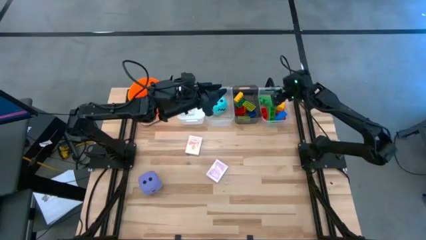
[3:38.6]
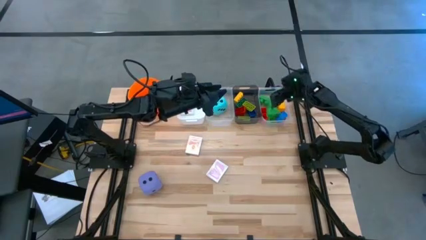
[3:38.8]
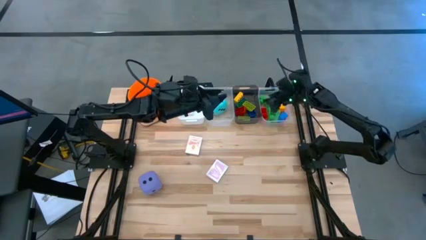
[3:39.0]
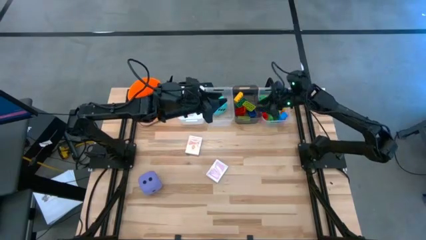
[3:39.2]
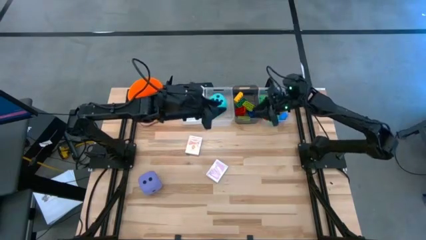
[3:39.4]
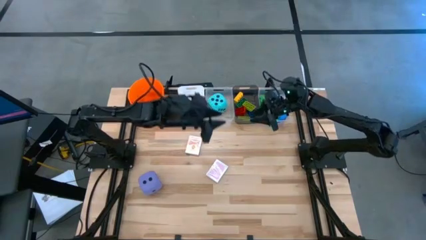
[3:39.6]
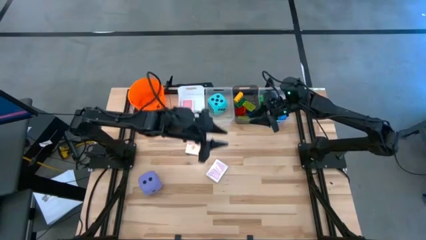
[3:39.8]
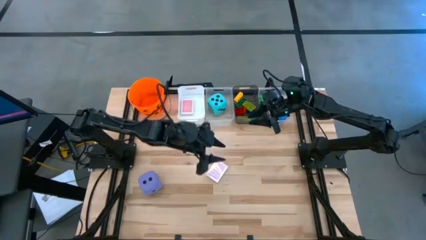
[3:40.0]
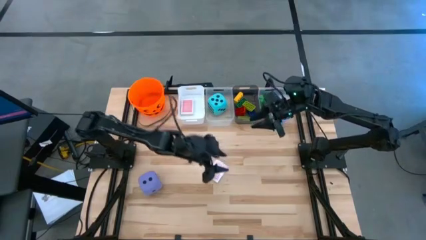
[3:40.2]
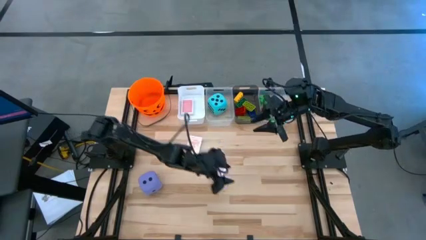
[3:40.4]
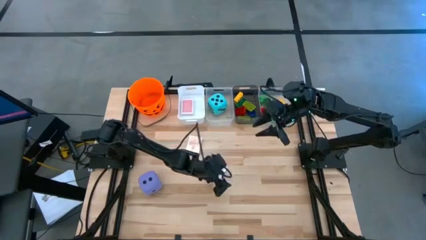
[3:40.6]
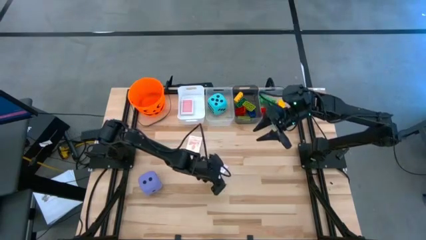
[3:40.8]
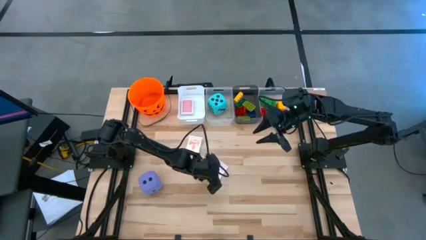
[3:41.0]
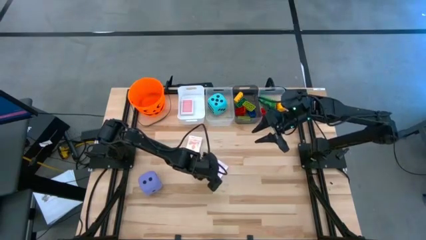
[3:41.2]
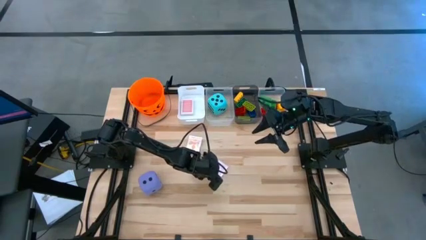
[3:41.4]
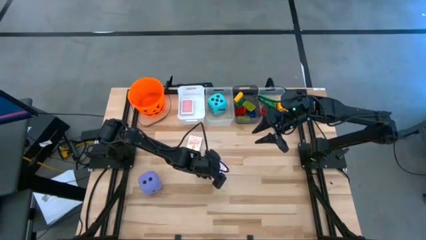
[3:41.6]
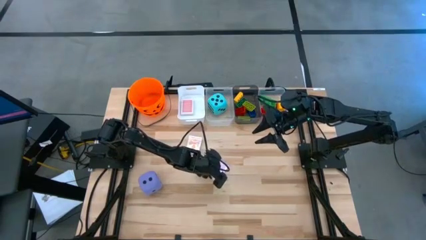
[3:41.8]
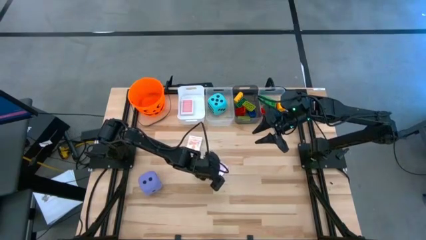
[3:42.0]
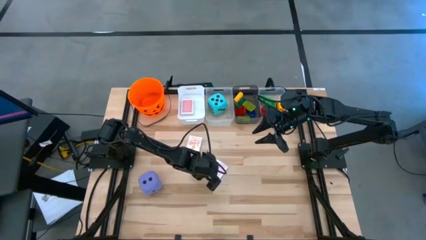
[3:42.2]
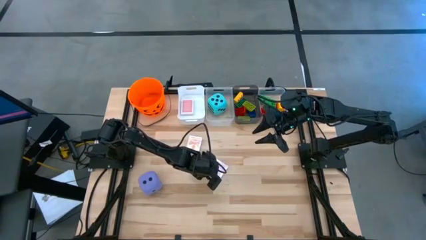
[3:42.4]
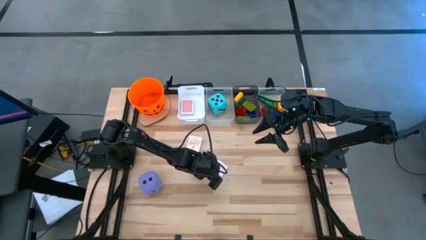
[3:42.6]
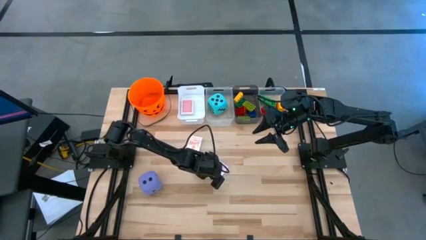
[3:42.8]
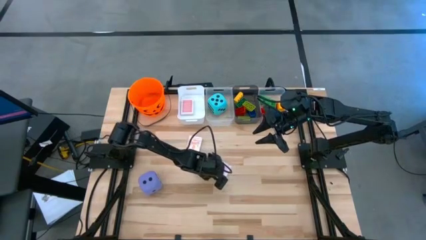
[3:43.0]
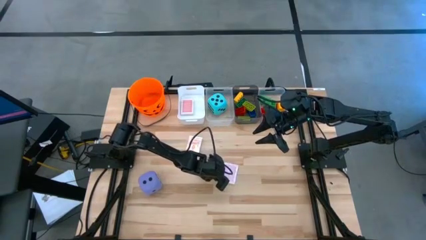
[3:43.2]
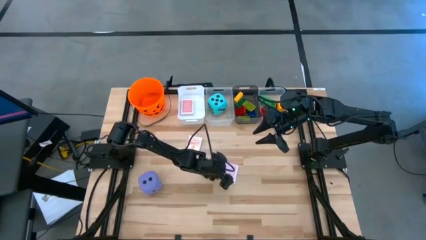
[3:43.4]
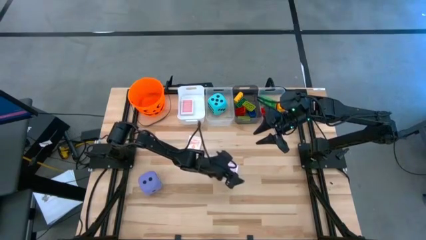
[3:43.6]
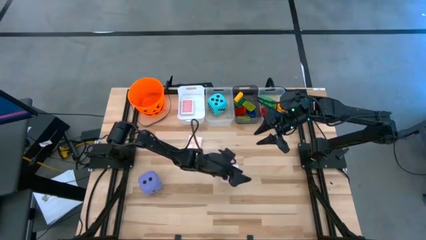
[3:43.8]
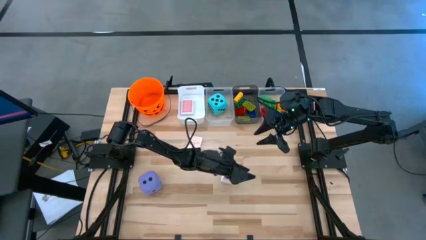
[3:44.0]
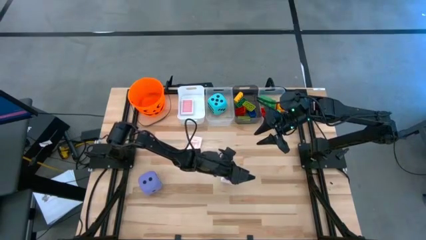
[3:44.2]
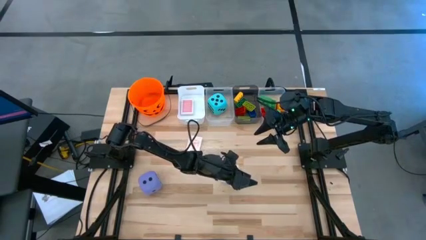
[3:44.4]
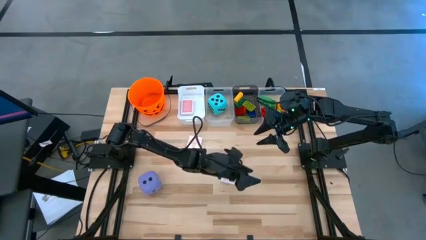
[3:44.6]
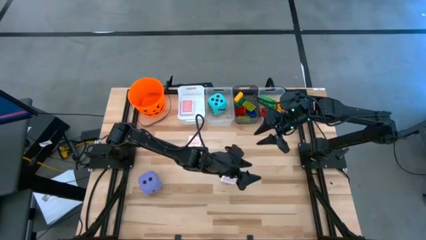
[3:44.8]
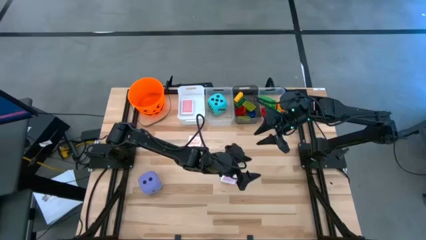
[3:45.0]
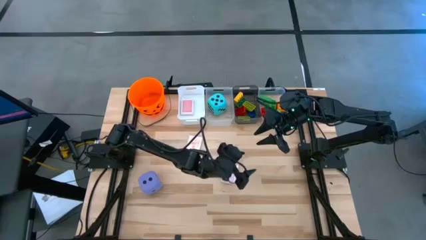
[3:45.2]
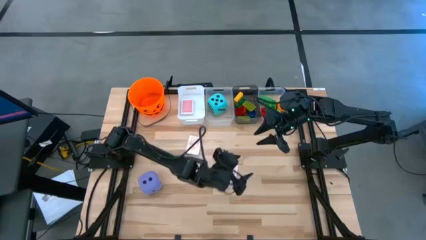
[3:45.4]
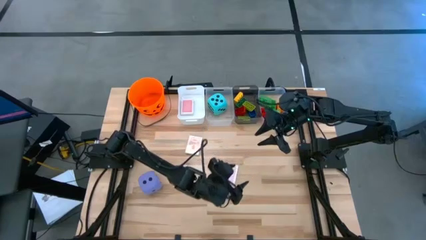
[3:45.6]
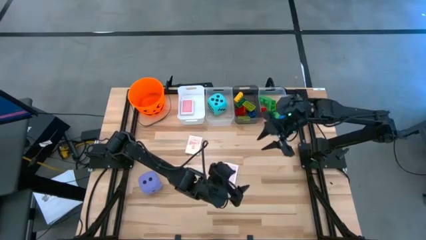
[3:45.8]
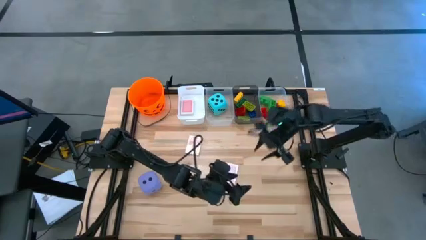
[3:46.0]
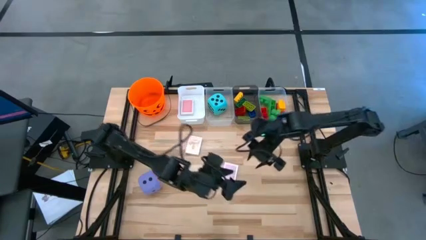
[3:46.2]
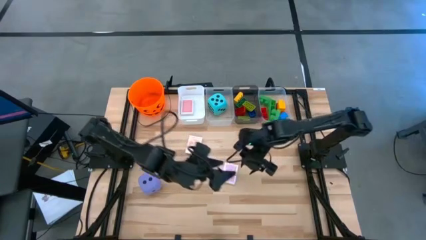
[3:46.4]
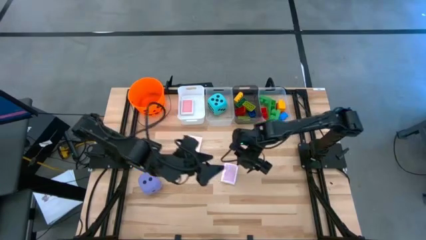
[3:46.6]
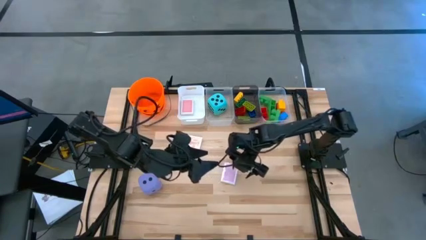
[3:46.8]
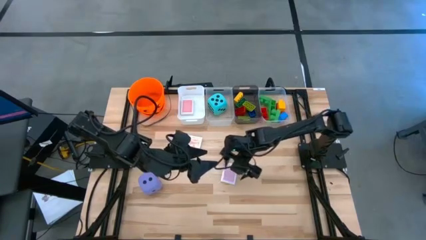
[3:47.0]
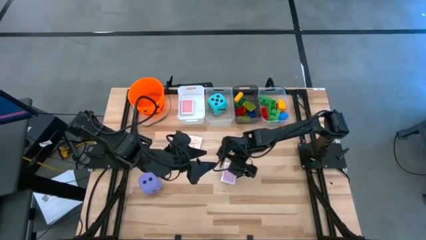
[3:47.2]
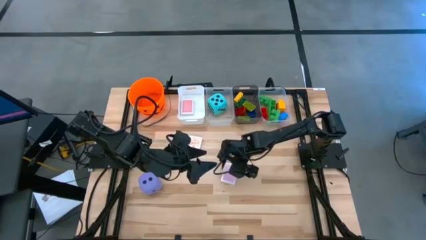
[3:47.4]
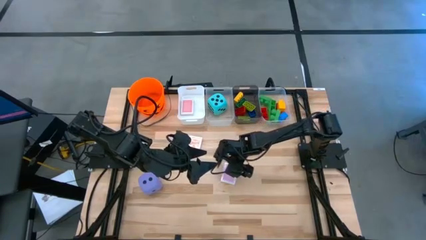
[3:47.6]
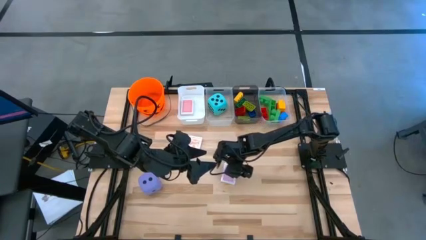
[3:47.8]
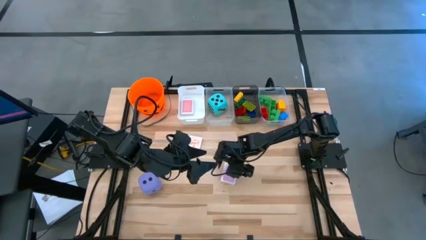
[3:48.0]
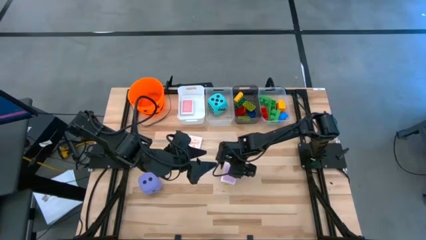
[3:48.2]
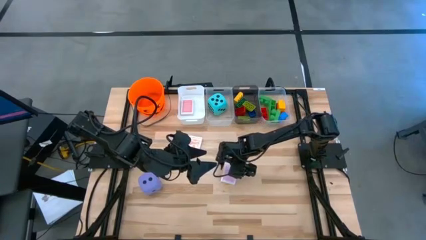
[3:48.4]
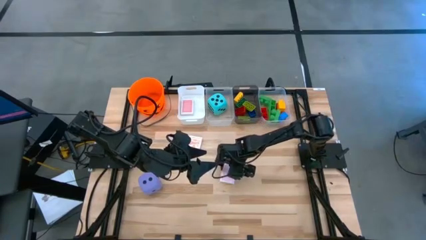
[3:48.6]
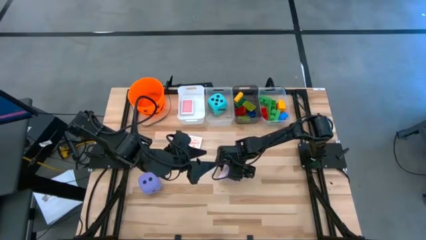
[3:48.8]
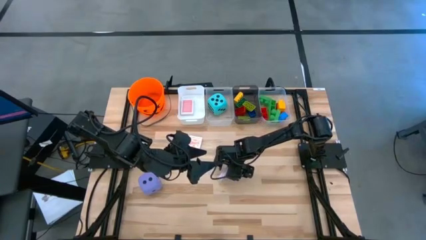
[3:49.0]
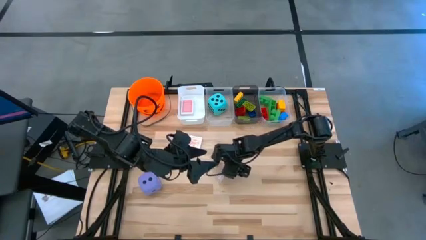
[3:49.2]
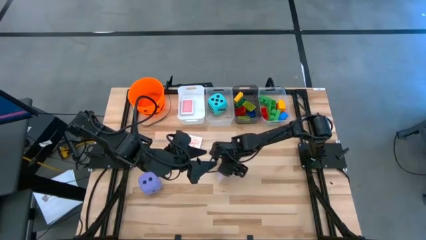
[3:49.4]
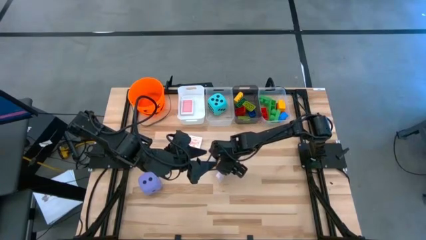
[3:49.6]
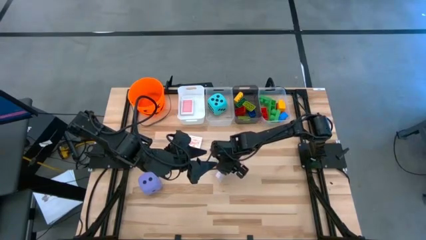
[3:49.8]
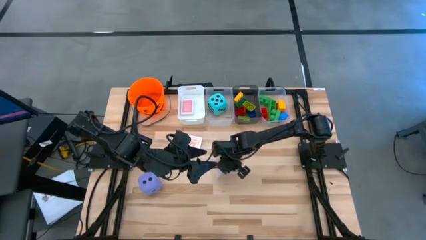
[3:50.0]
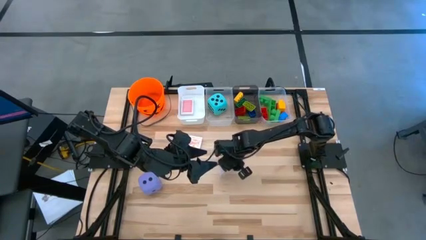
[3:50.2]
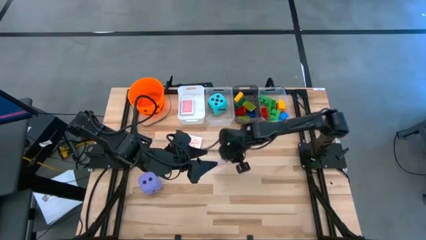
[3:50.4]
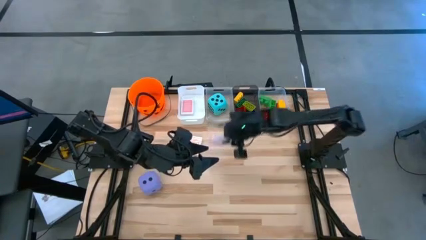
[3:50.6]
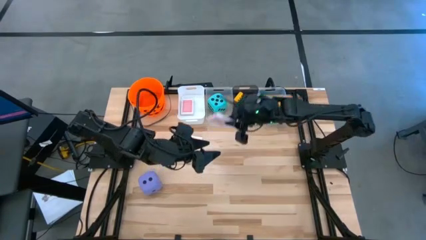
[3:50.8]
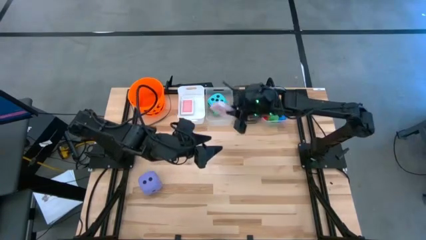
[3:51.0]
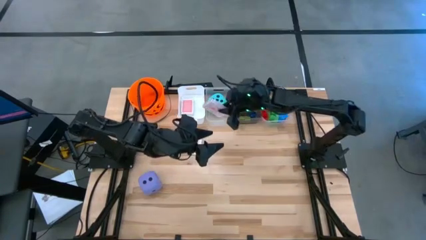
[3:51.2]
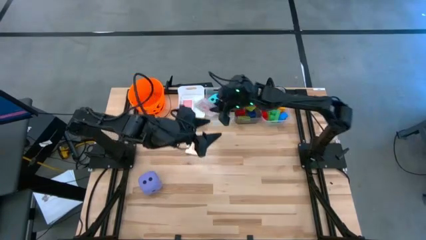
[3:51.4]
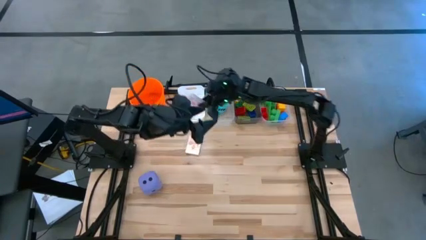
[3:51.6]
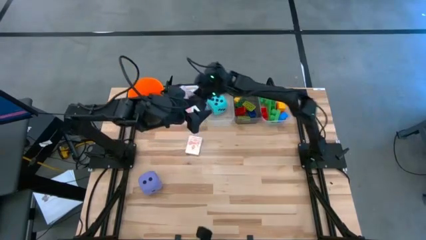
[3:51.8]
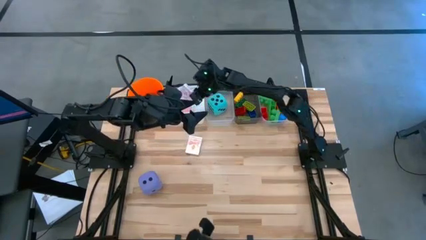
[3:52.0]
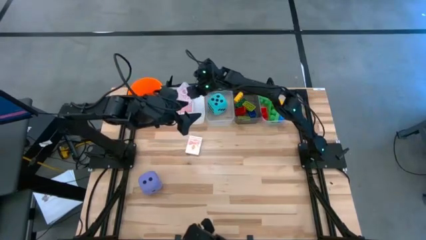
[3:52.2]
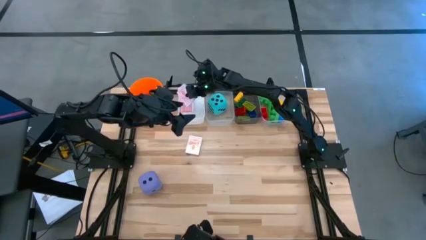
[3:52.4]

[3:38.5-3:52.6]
Task: Pick & Place Toys
Put the pink deck of cards into the white bin
